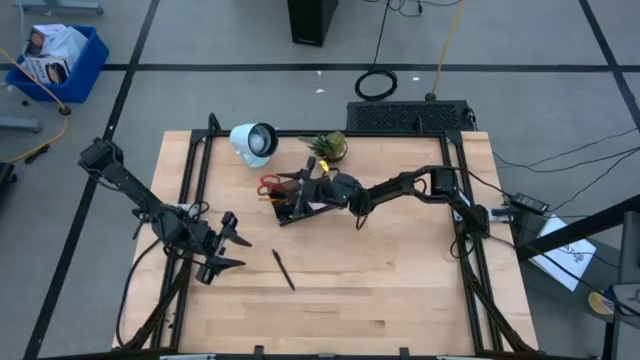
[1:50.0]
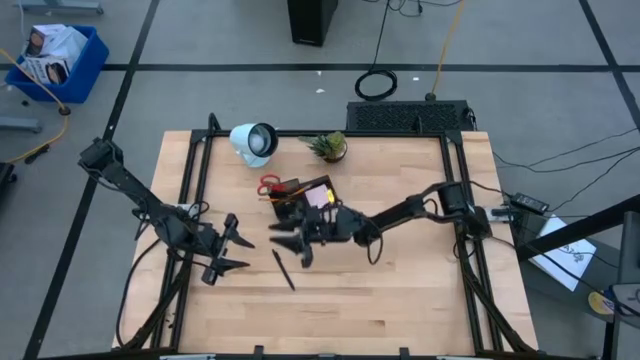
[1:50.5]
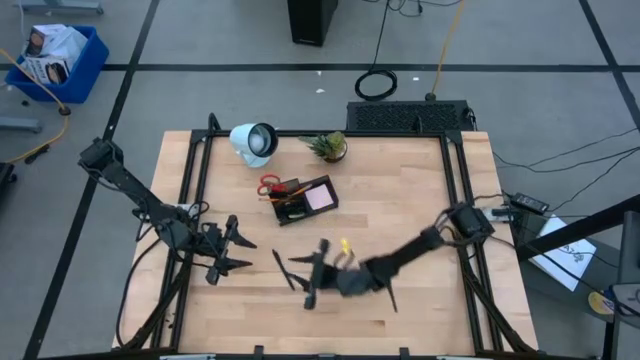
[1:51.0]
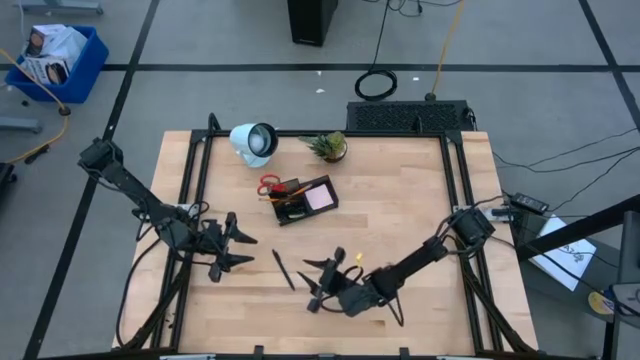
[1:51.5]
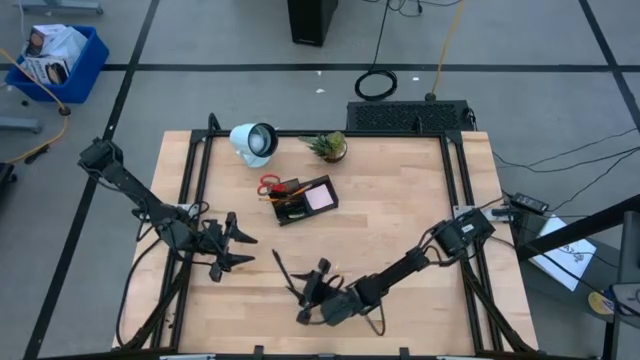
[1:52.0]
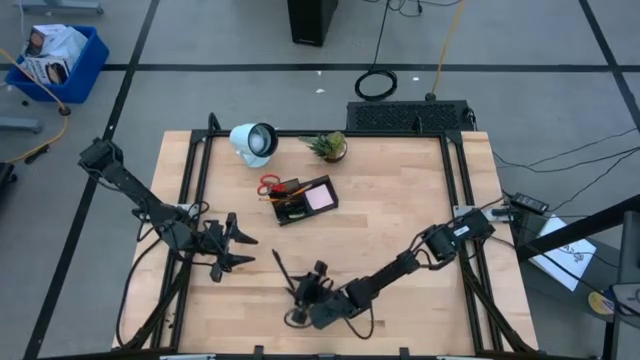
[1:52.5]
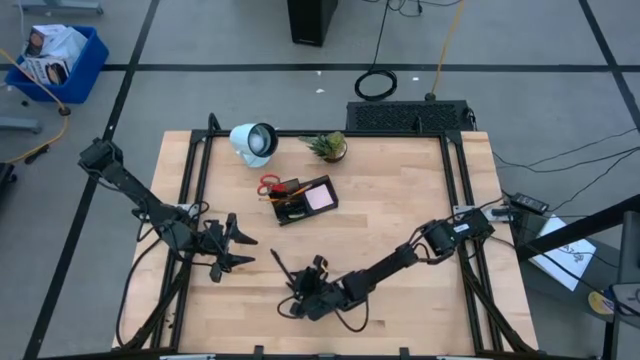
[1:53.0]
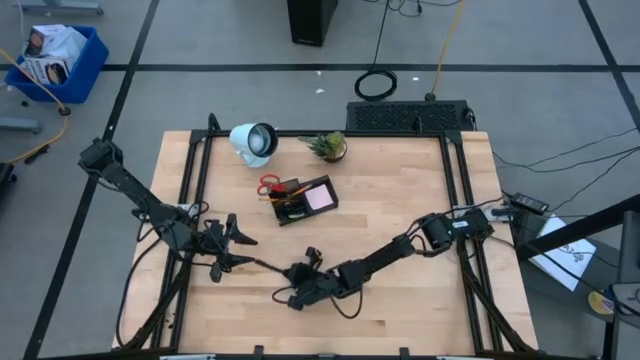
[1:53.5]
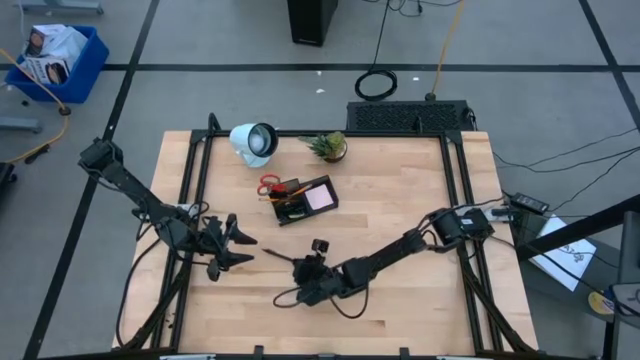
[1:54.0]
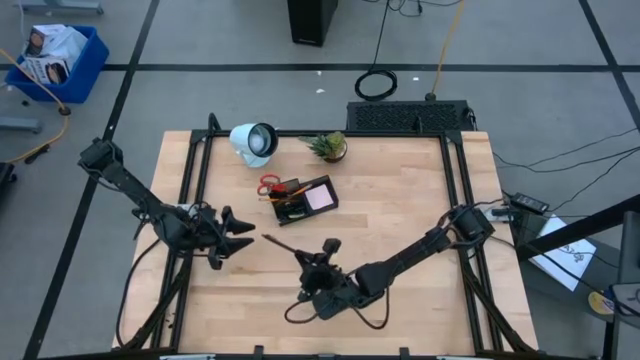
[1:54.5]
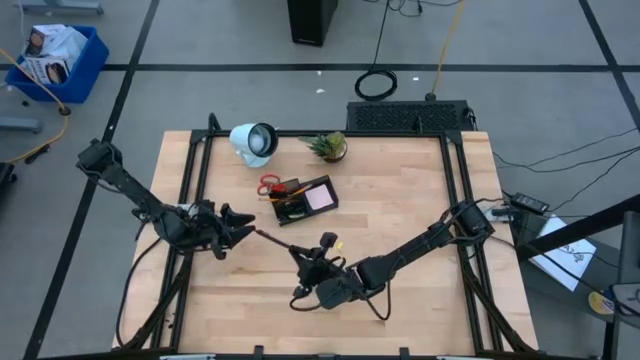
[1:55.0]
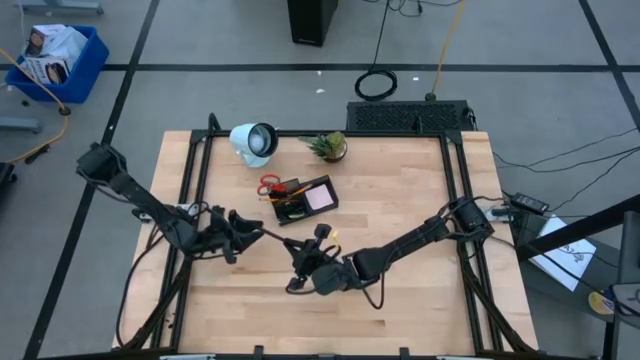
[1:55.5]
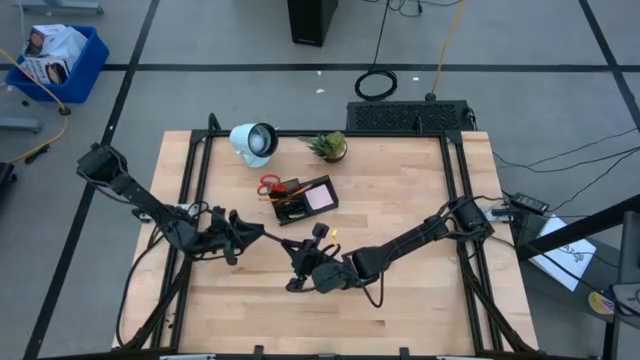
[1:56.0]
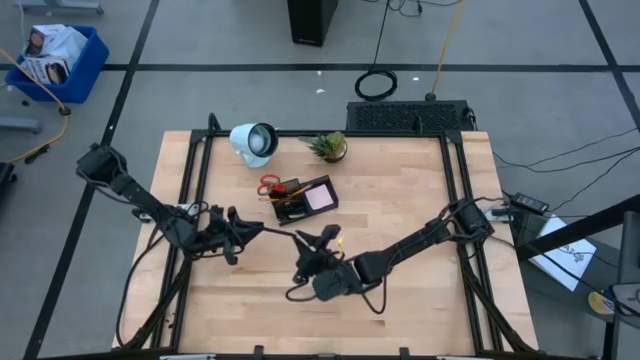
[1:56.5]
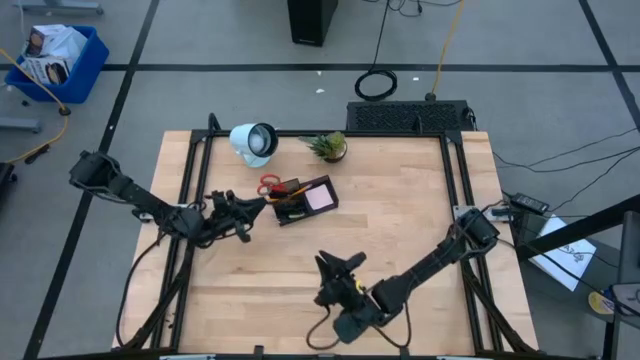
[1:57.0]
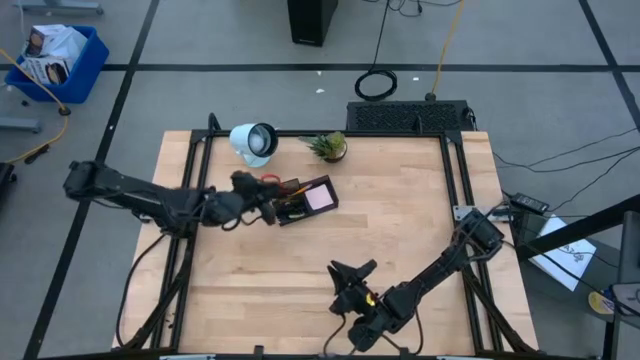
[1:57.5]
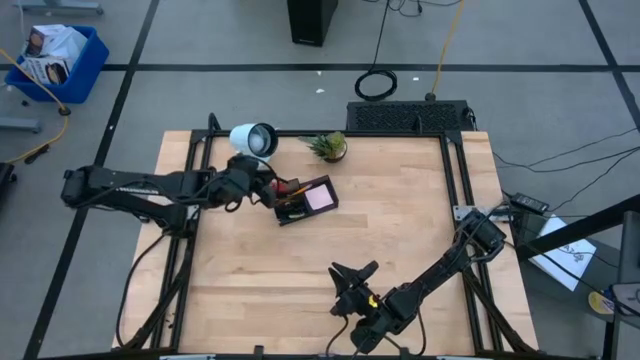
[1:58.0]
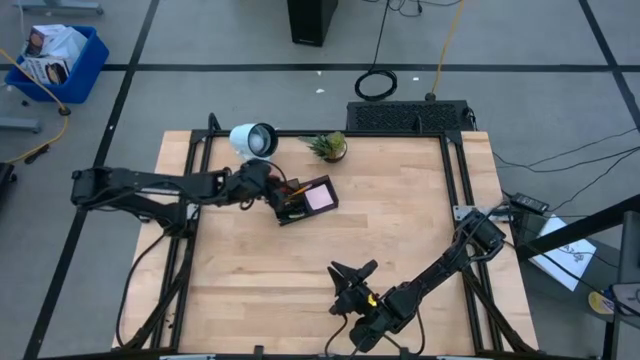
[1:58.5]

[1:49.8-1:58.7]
Task: Pick and place office supplies into organizer
Put the black pen into the black desk organizer

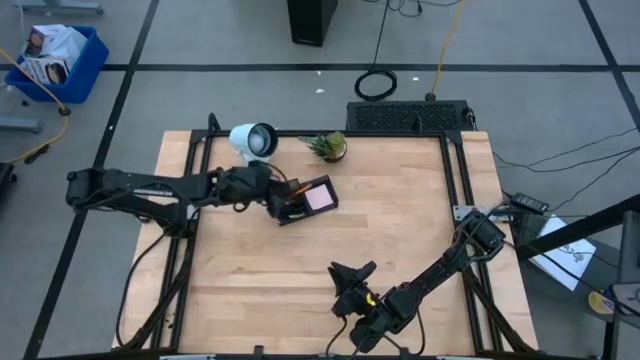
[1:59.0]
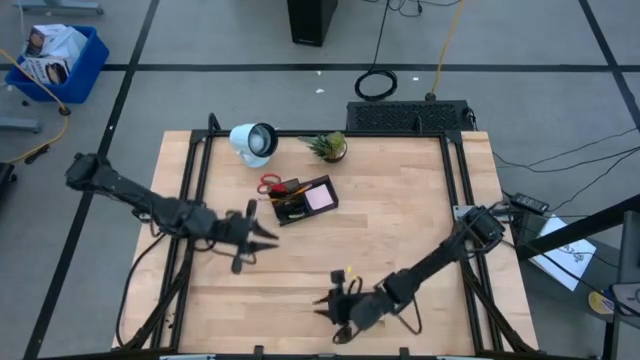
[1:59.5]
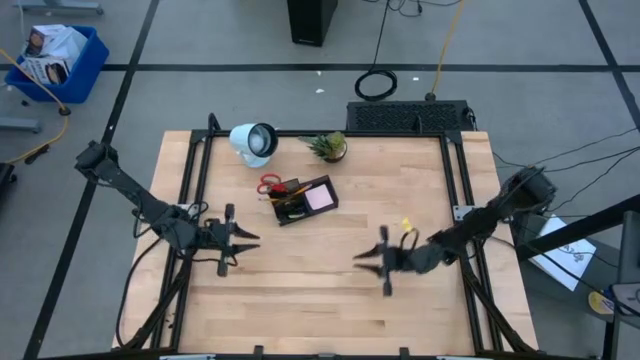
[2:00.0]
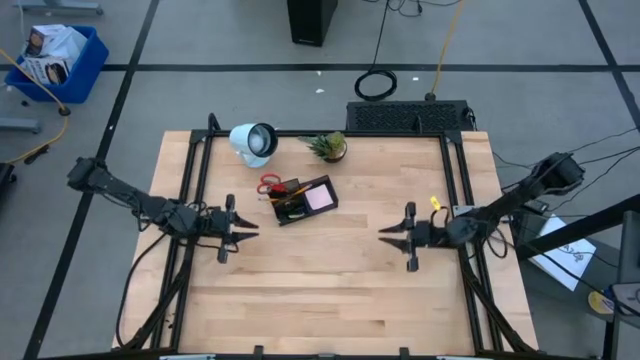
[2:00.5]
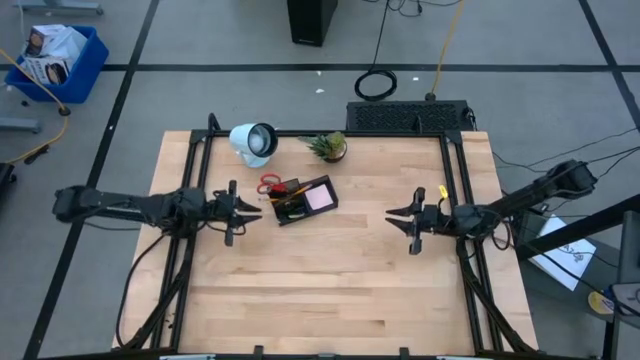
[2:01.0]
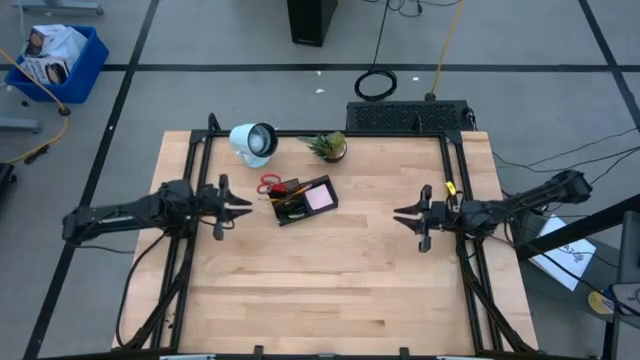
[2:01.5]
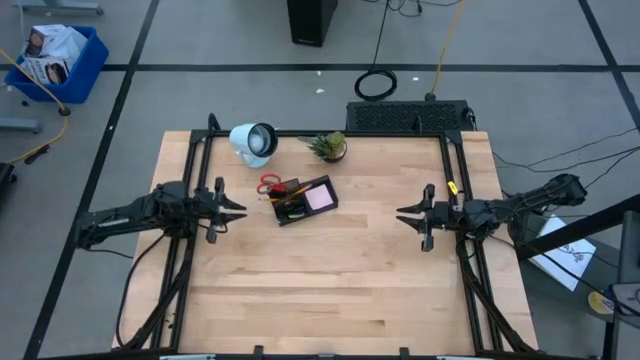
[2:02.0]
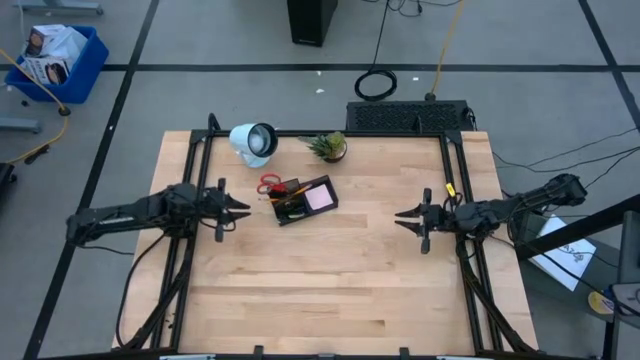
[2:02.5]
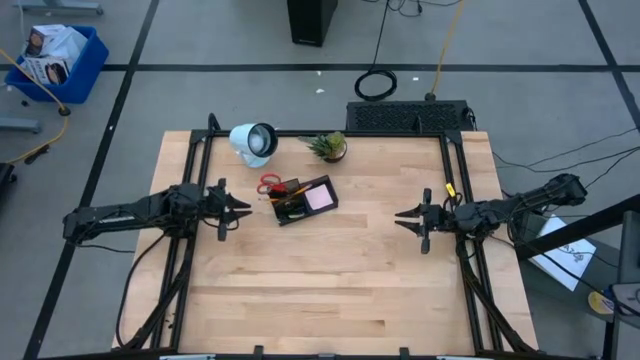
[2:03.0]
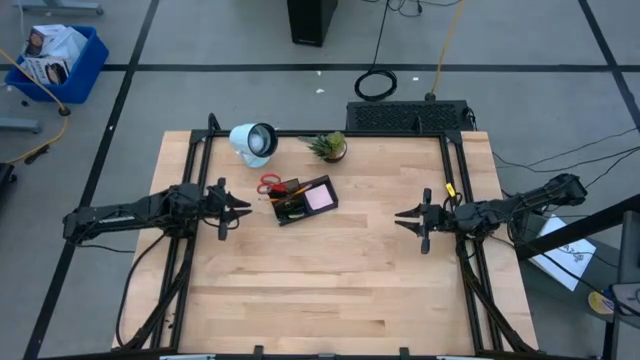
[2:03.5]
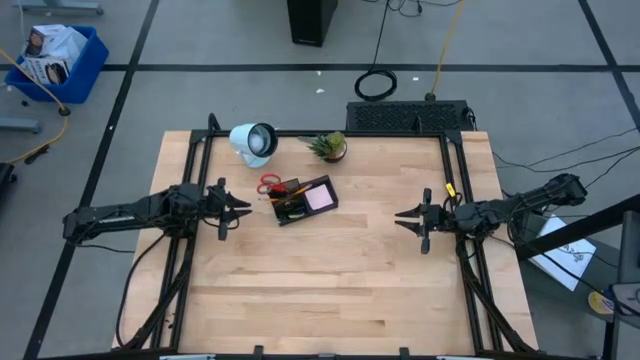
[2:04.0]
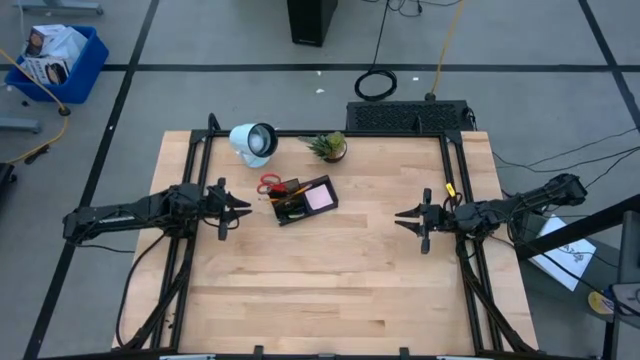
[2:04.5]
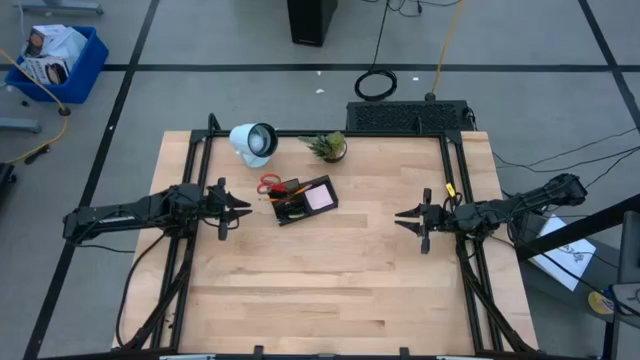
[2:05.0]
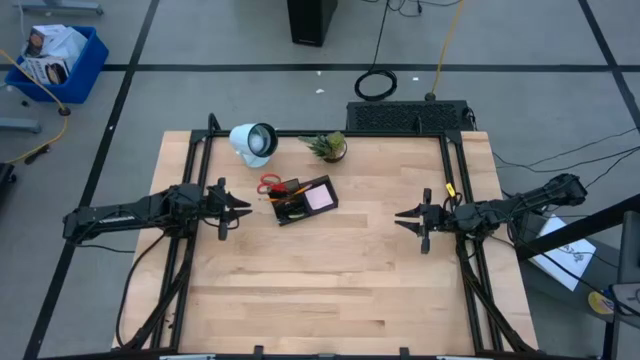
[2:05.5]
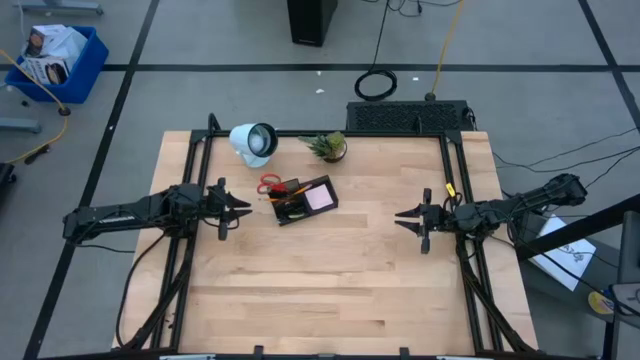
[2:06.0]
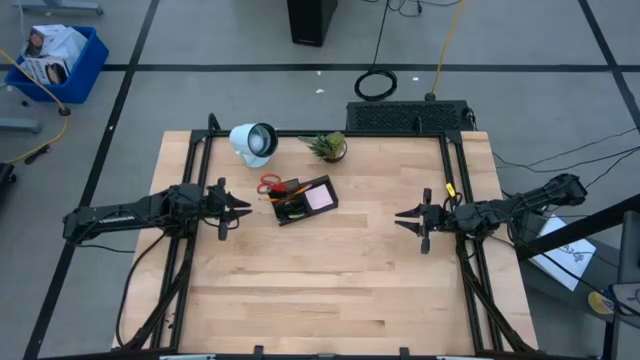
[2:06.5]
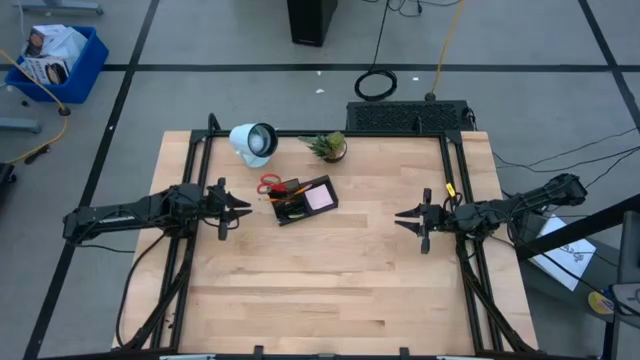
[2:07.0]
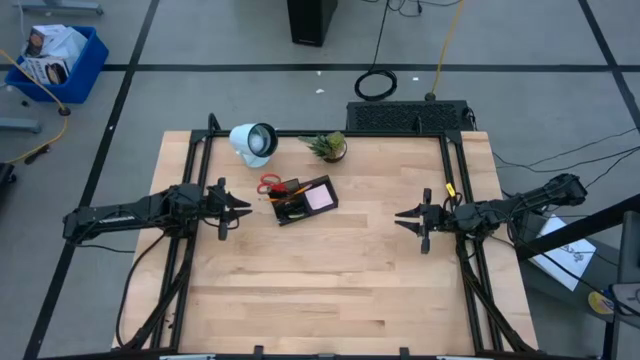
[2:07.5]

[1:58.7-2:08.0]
Return to Home Position

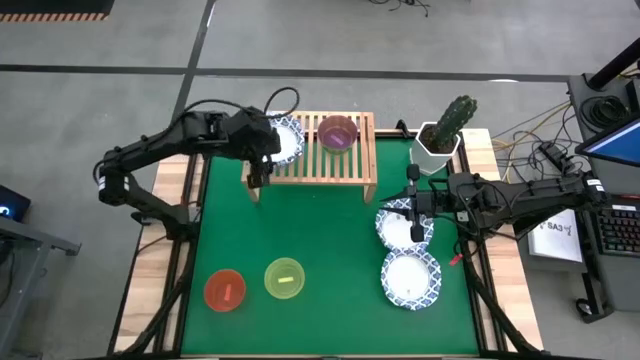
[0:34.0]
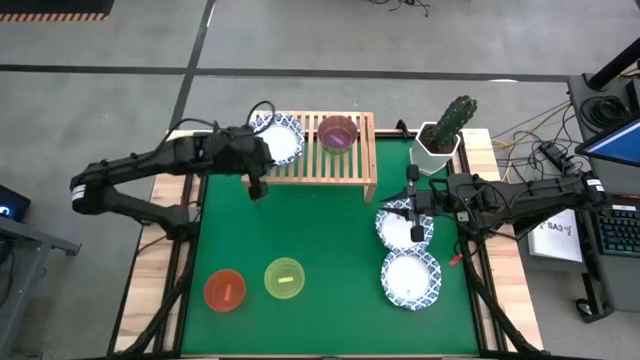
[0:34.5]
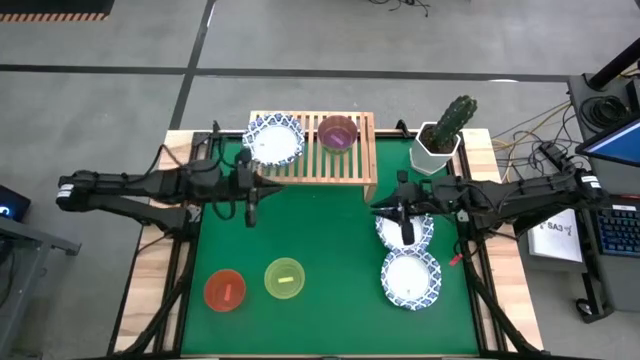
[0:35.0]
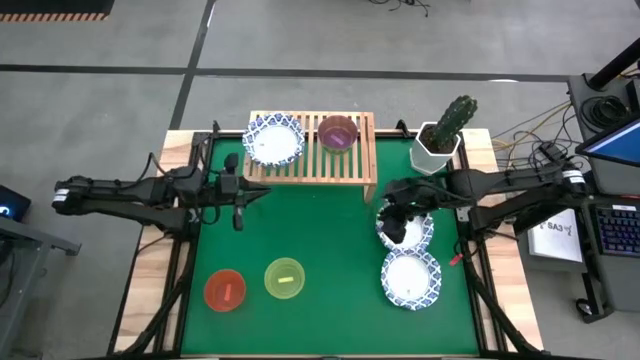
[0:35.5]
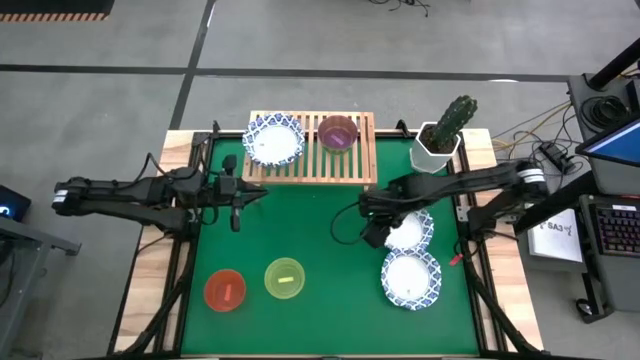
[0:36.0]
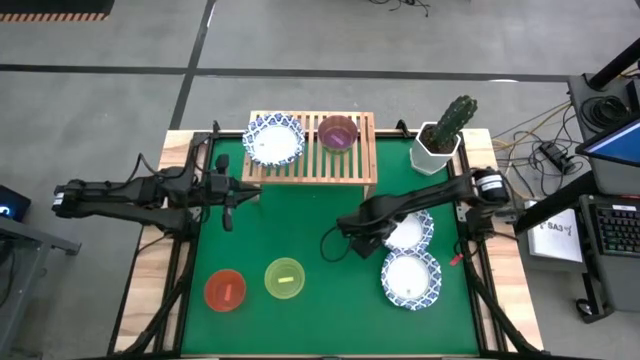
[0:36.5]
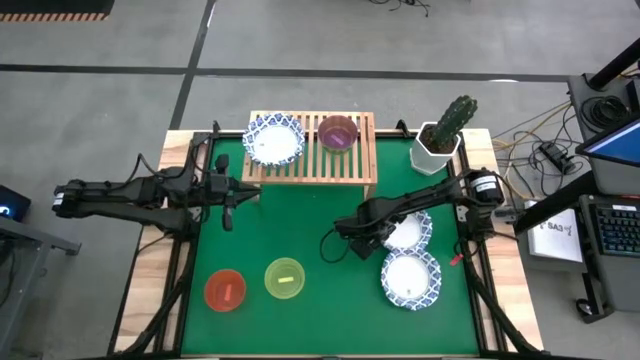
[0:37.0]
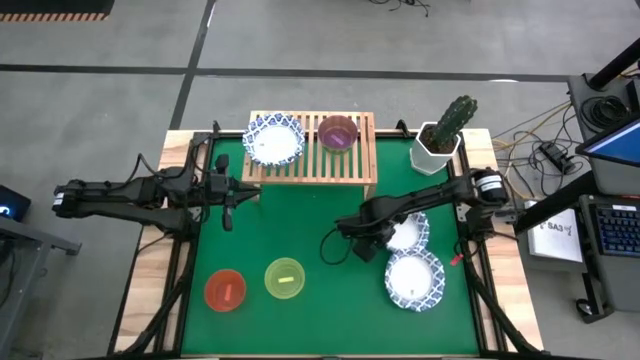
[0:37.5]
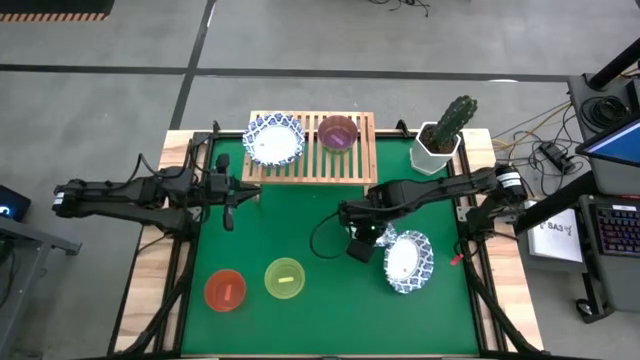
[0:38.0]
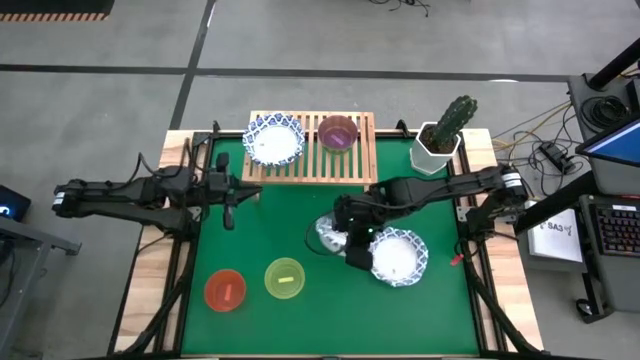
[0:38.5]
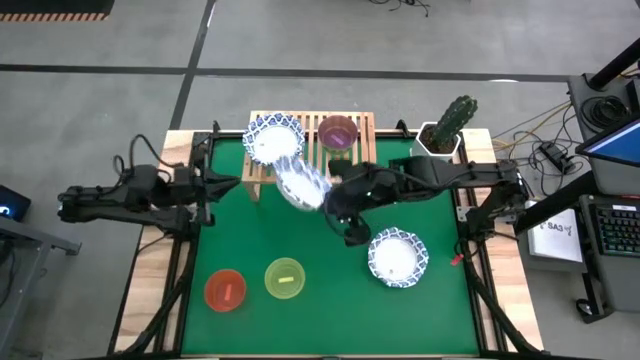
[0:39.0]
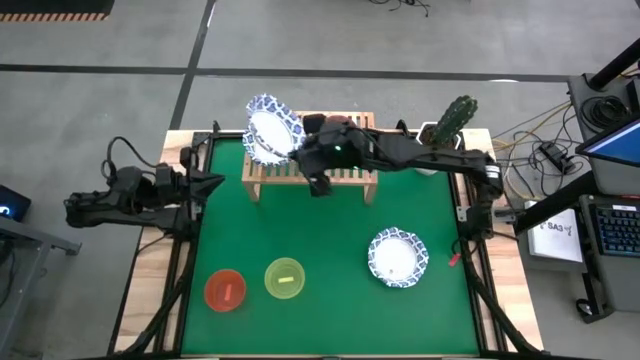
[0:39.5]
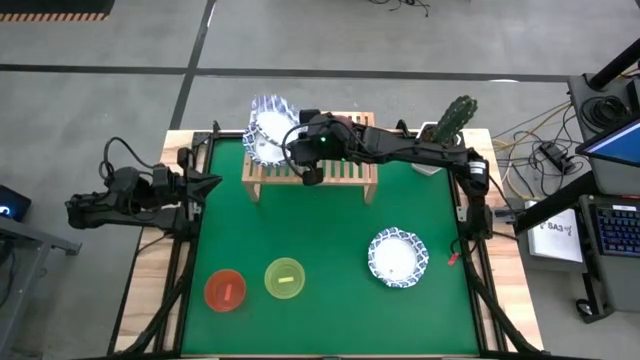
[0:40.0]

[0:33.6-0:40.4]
Task: Place and stack bowls onto a shelf
Stack the blue patterned bowl on top of the blue patterned bowl on the shelf
